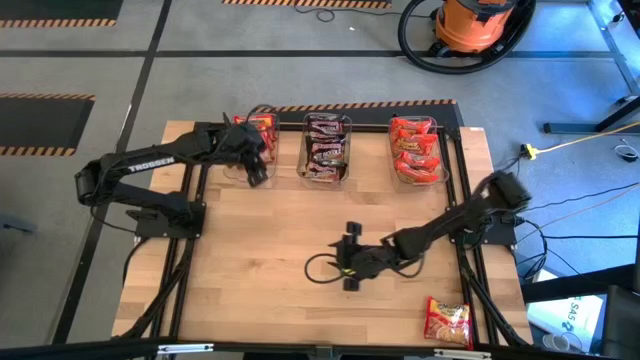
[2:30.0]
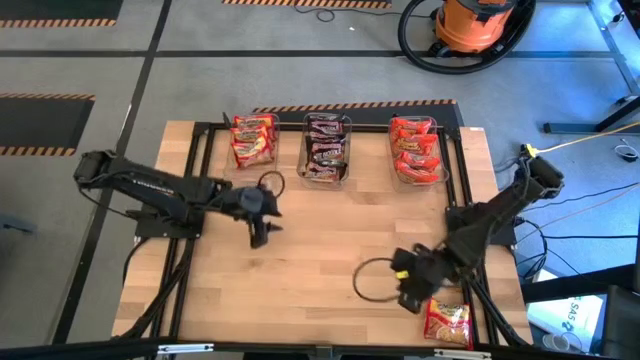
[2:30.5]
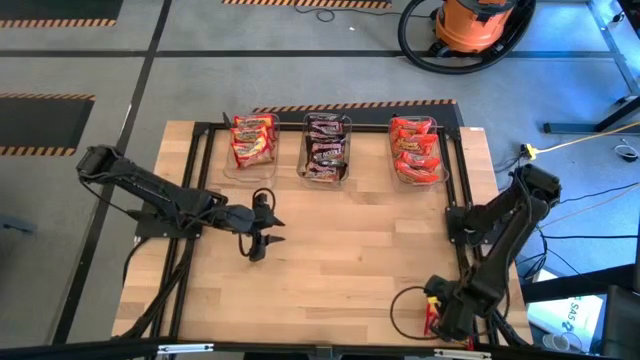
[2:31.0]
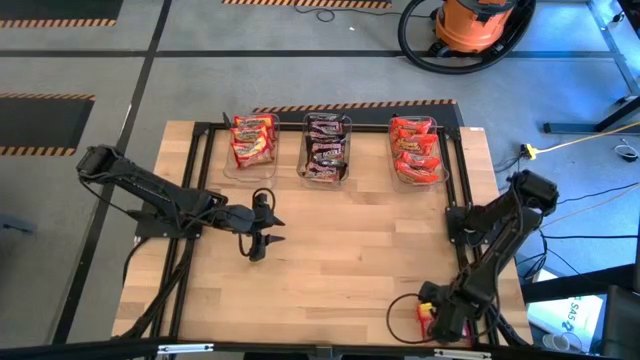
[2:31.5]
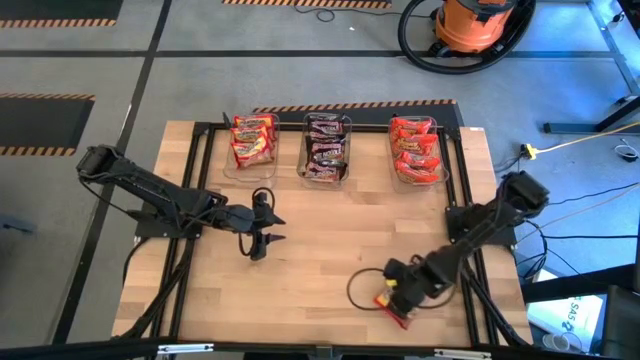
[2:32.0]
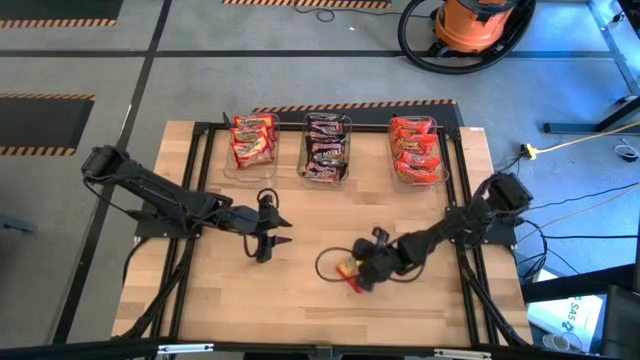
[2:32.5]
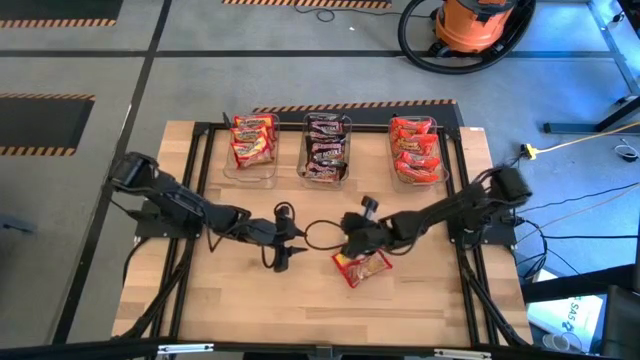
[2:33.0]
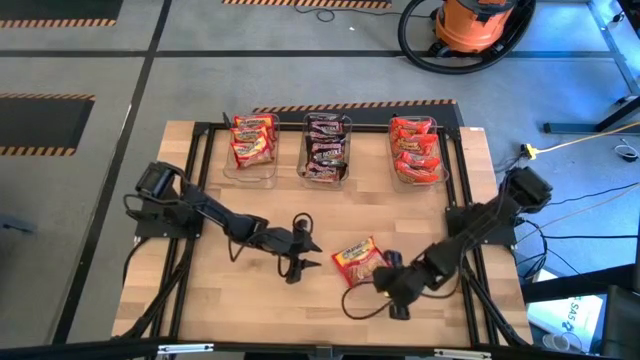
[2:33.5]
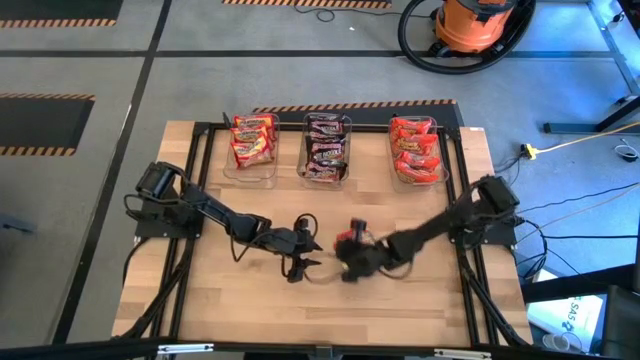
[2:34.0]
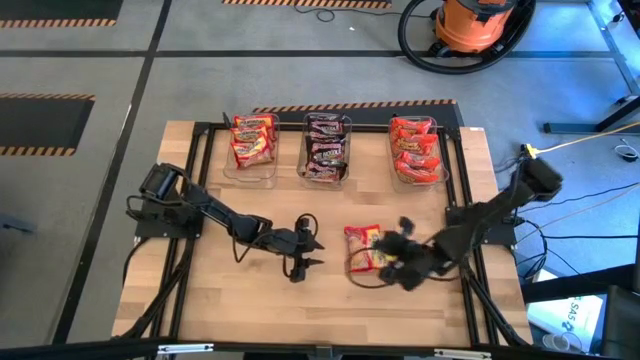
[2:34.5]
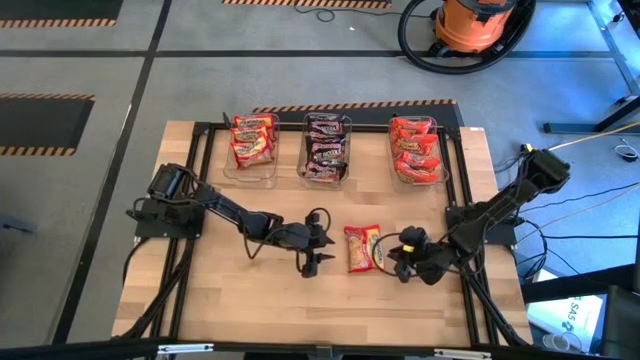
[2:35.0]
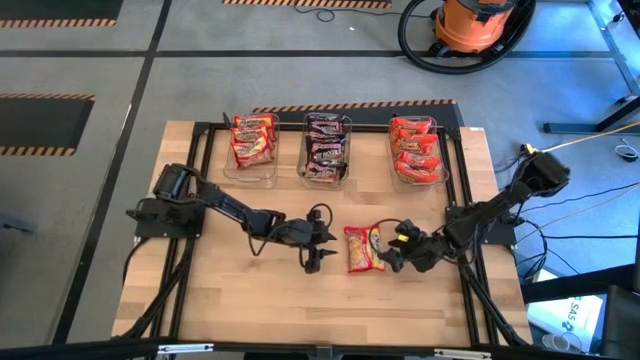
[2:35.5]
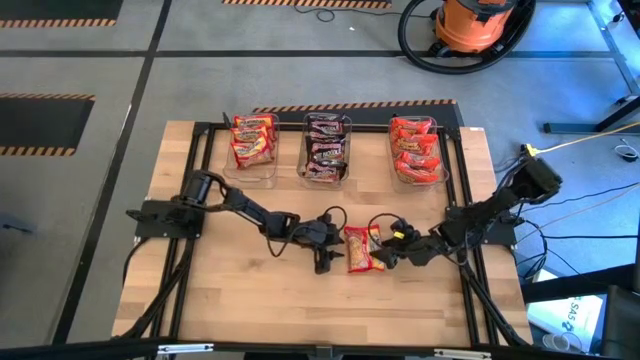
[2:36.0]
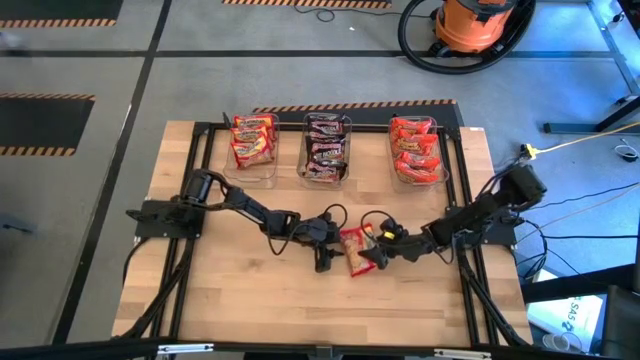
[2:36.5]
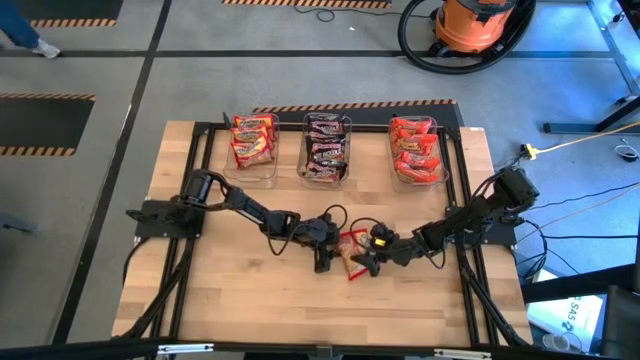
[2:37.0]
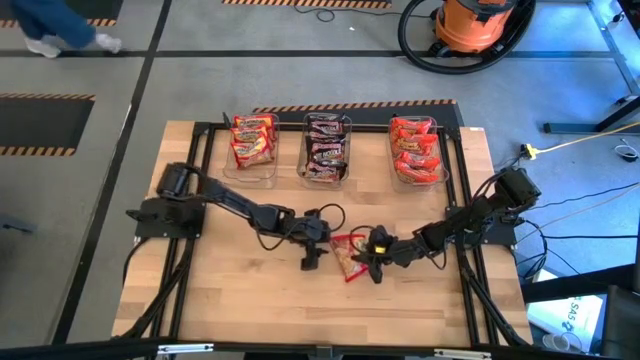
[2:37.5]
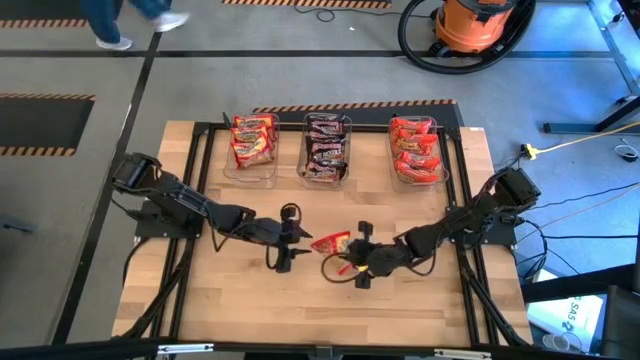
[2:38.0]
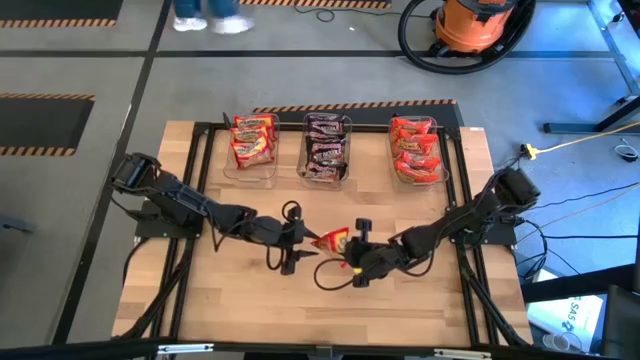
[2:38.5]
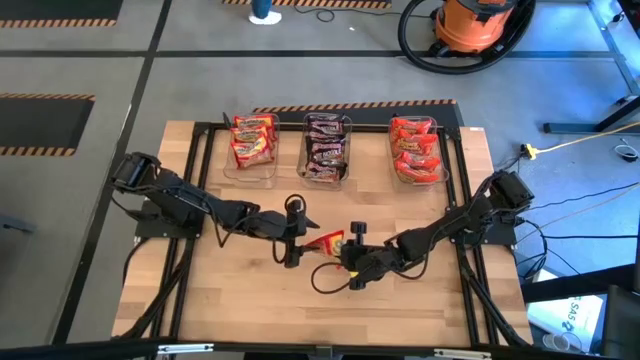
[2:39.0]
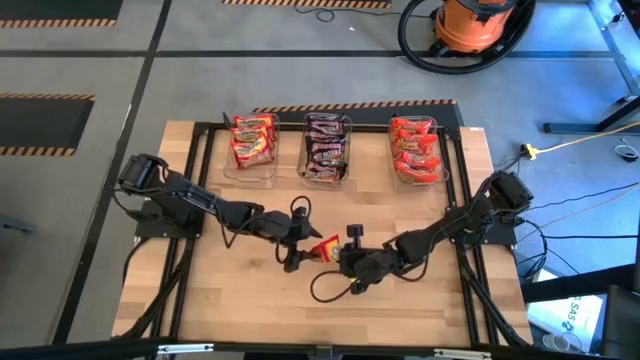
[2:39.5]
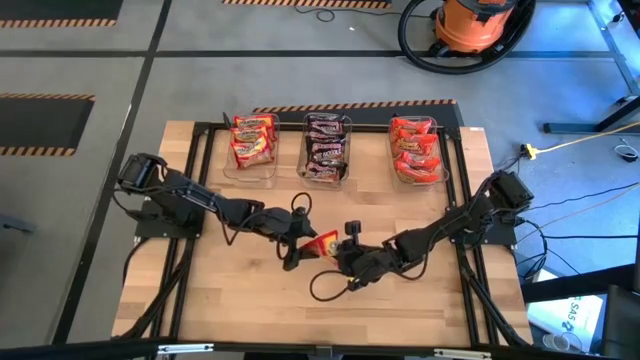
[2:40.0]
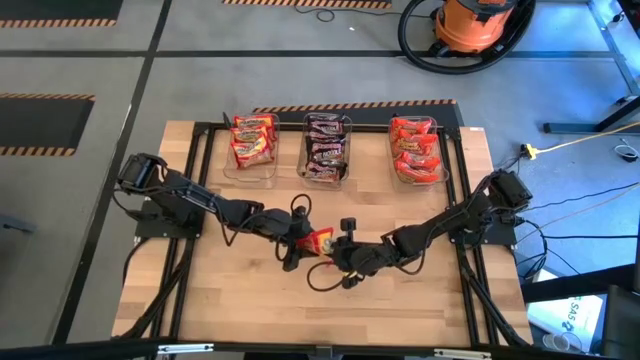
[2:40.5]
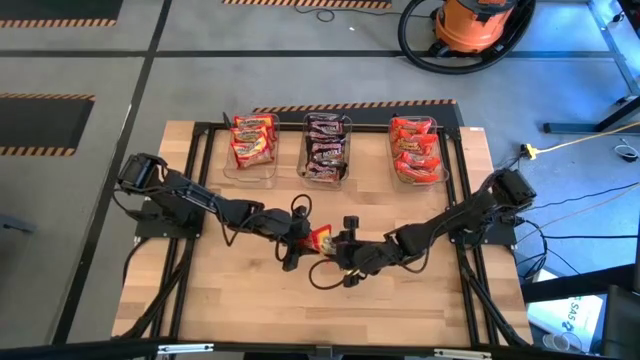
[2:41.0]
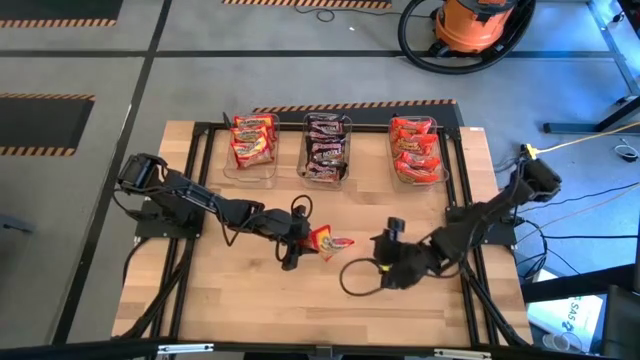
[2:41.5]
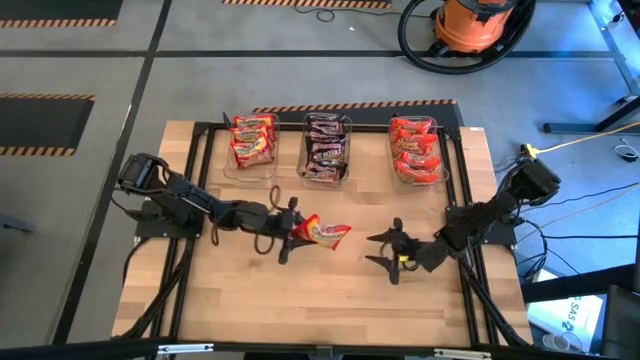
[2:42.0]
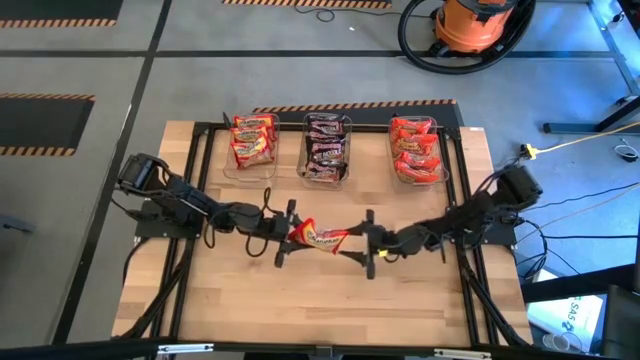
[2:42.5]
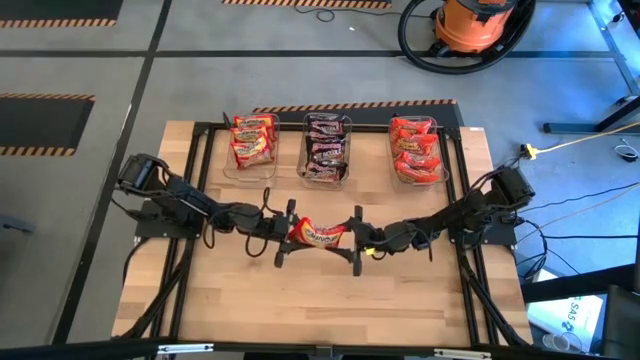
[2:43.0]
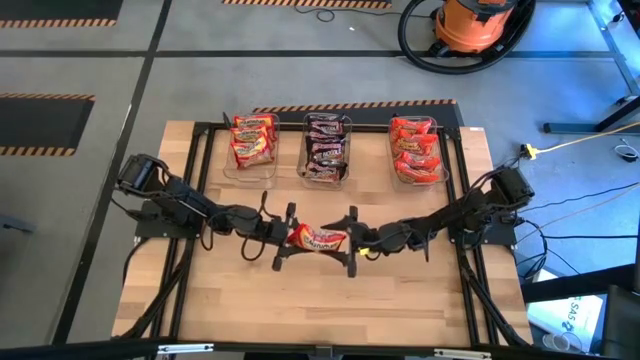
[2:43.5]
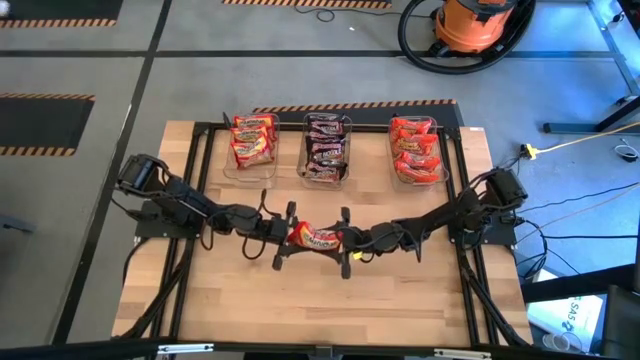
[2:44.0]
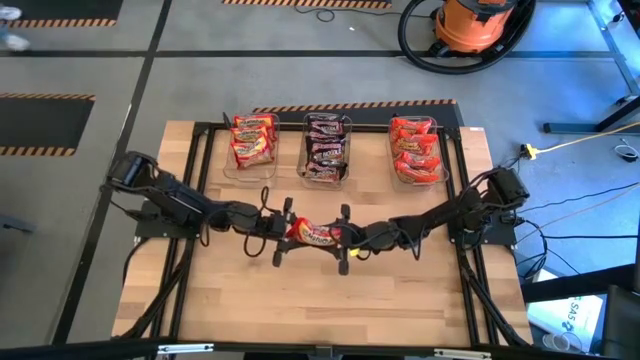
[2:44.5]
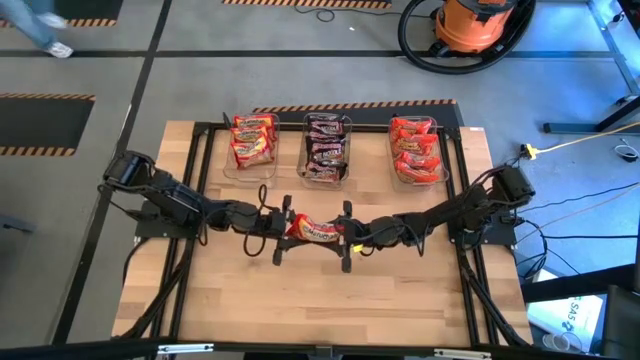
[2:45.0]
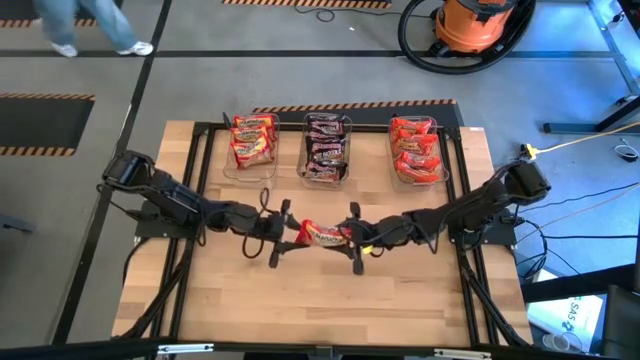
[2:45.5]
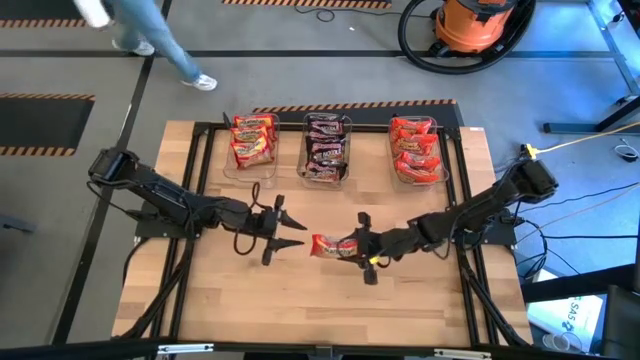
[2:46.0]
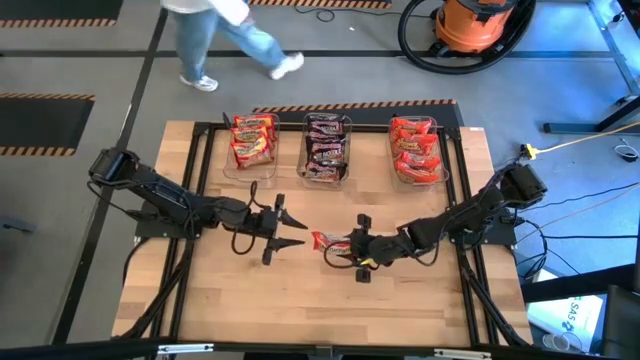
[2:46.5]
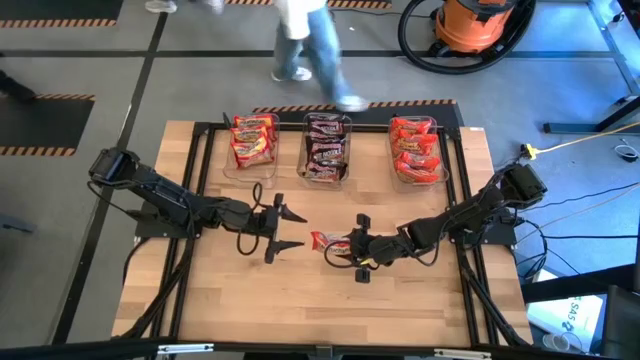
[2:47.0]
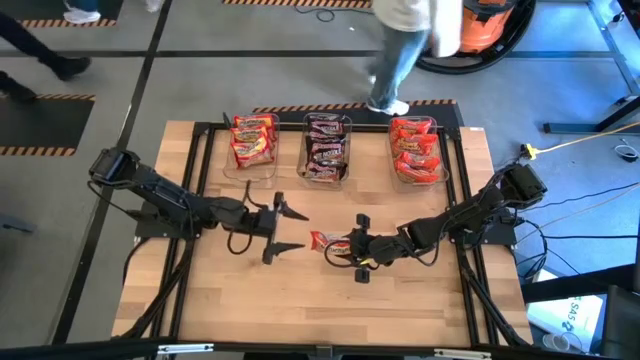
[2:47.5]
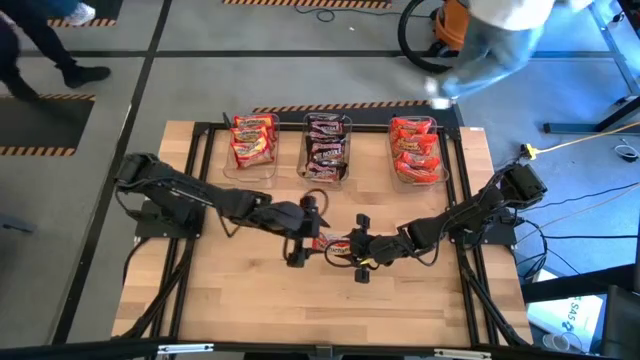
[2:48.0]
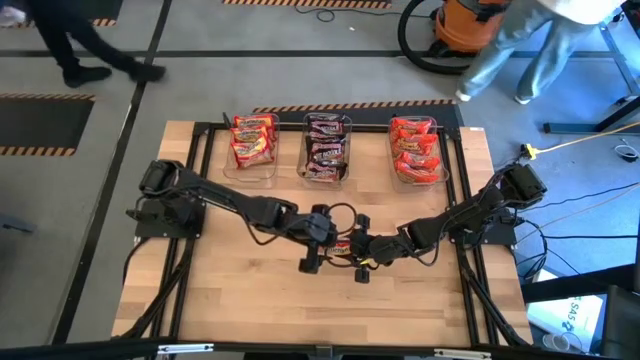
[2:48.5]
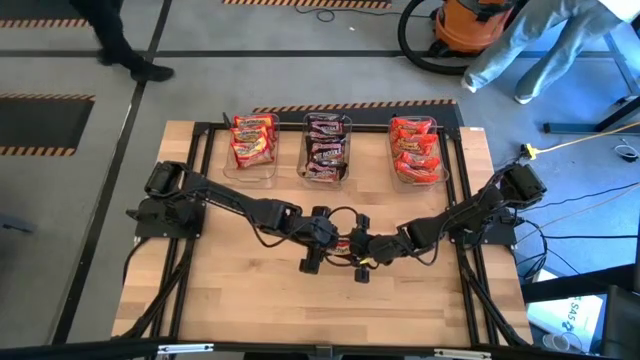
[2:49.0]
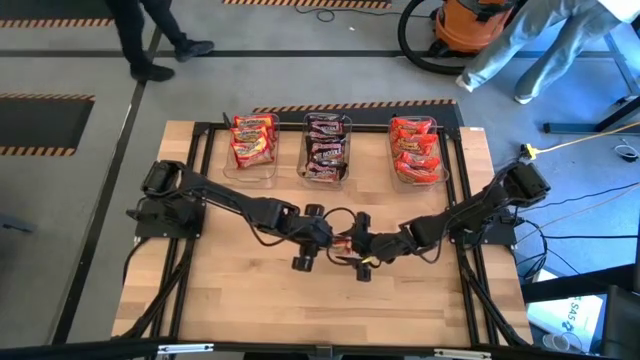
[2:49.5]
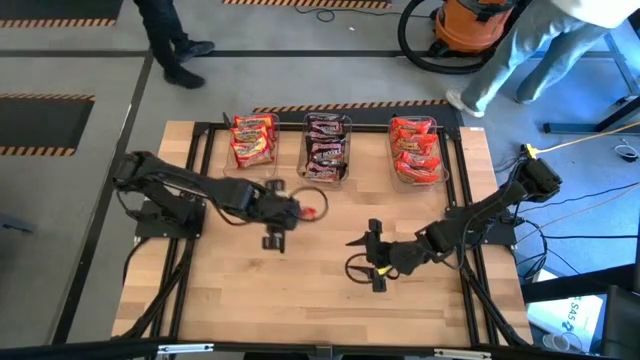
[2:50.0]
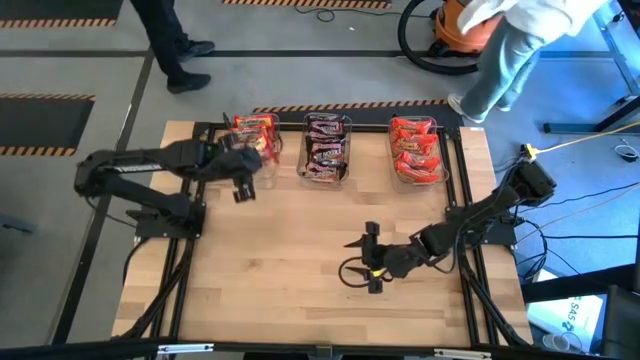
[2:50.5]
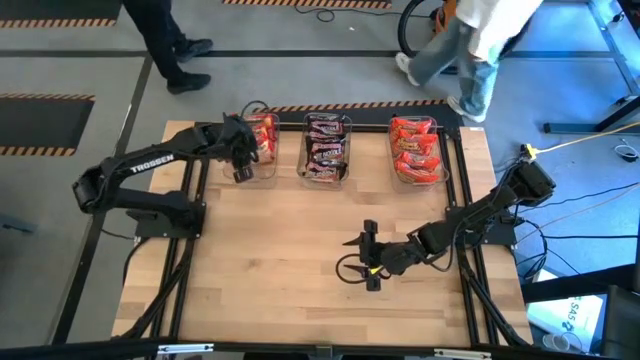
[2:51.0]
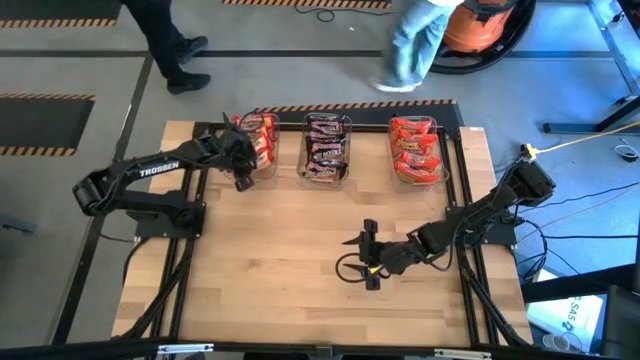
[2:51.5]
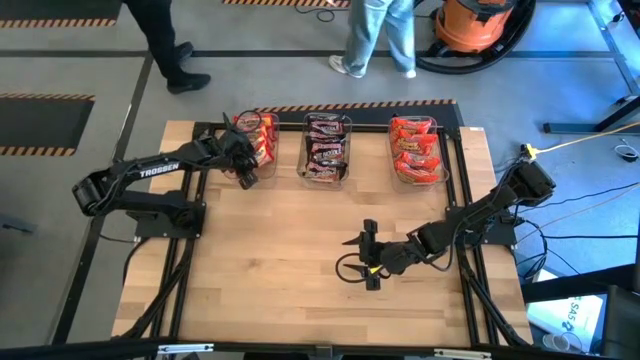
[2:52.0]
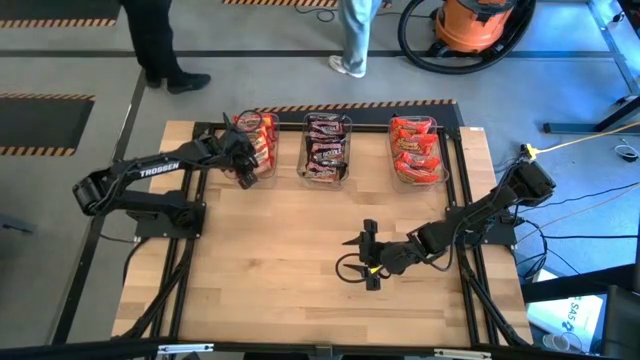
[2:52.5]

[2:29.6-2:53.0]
Task: Sort Maruchan noodles
Put the red noodle pack into the left transparent bin
